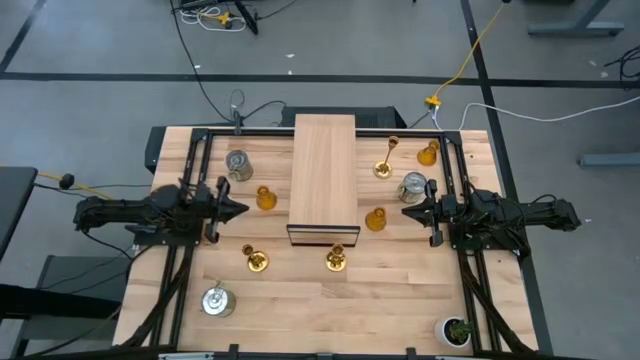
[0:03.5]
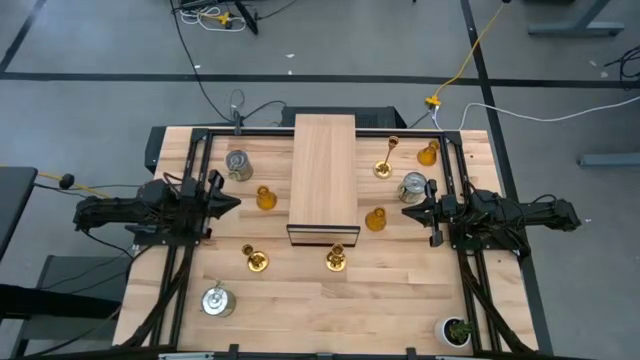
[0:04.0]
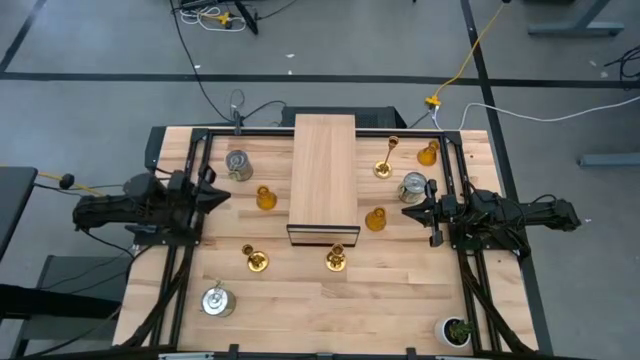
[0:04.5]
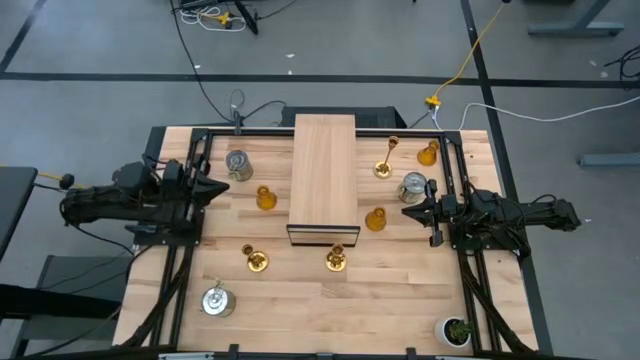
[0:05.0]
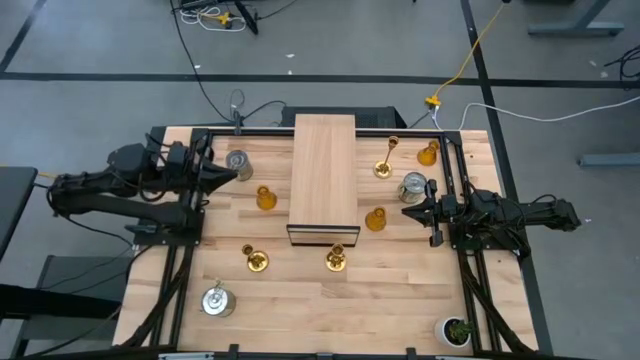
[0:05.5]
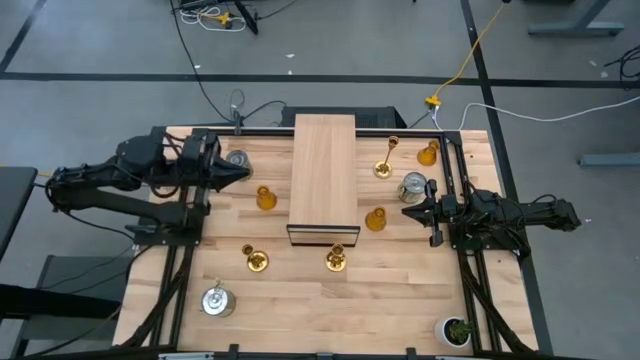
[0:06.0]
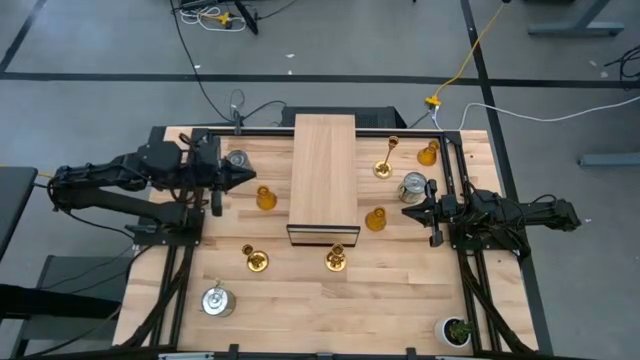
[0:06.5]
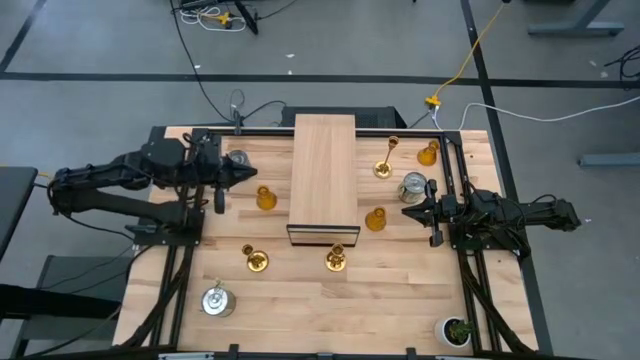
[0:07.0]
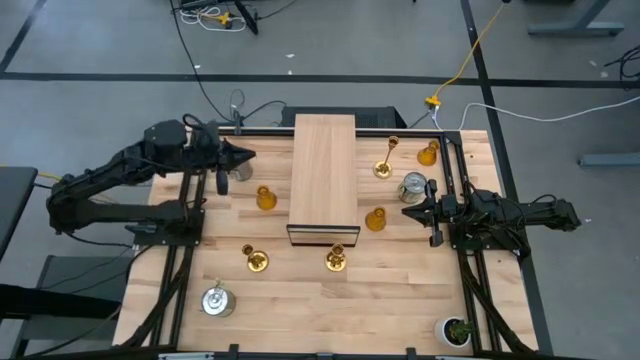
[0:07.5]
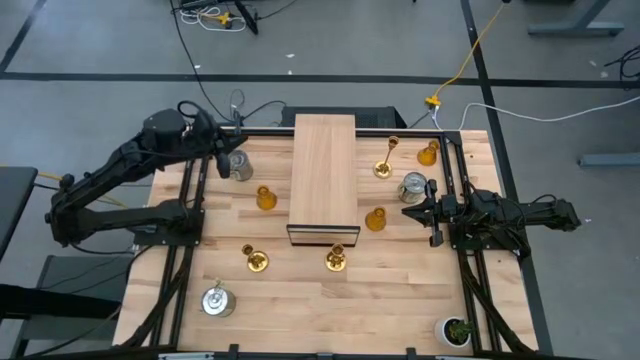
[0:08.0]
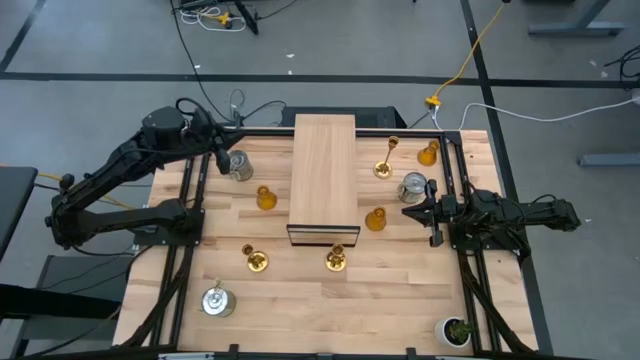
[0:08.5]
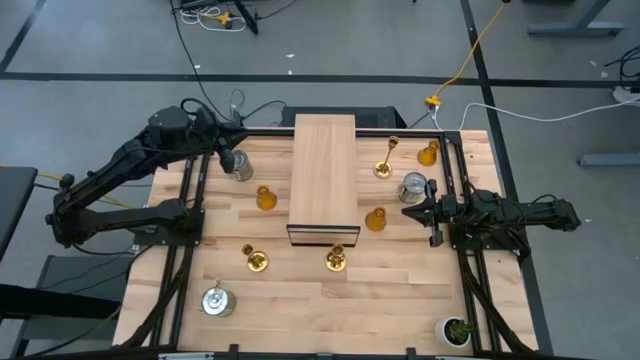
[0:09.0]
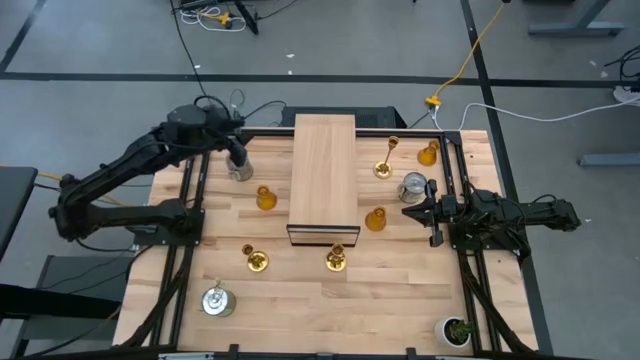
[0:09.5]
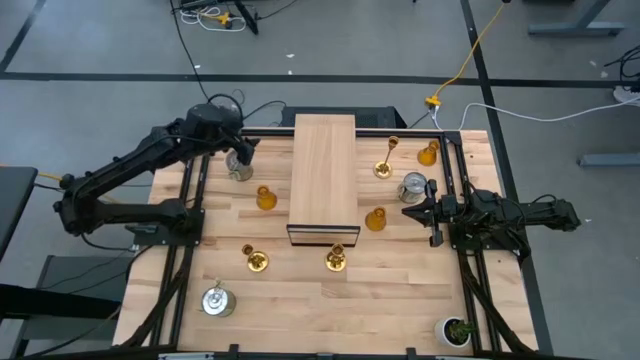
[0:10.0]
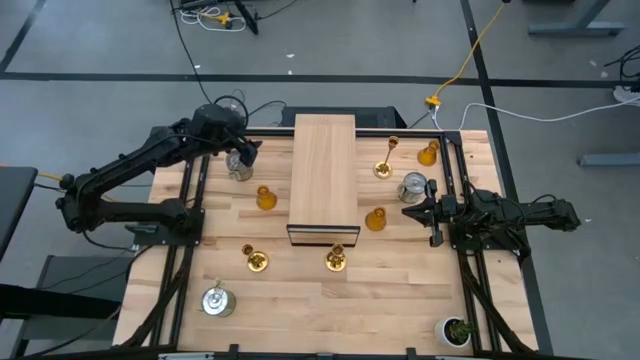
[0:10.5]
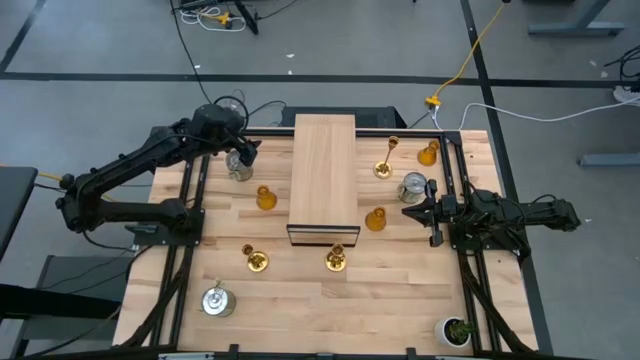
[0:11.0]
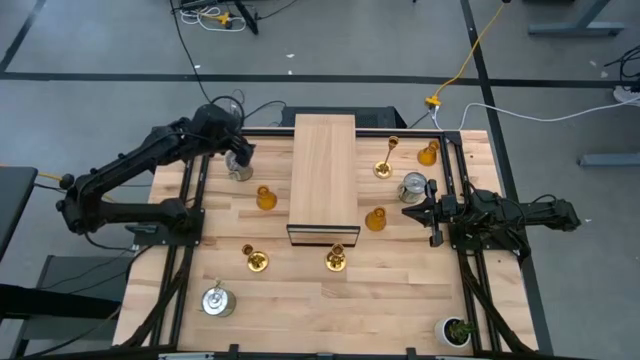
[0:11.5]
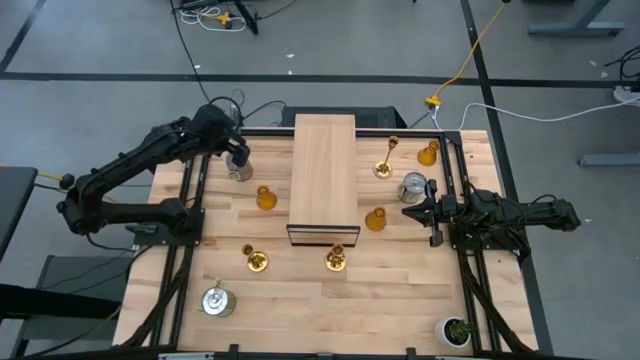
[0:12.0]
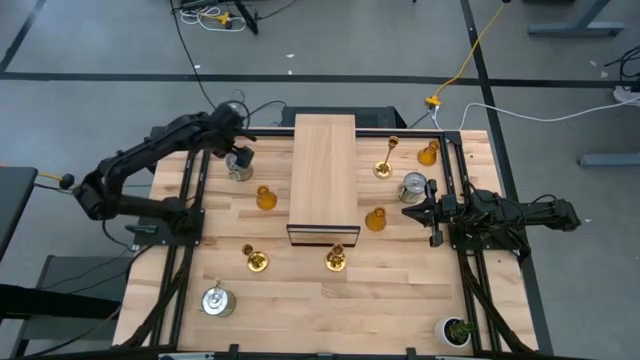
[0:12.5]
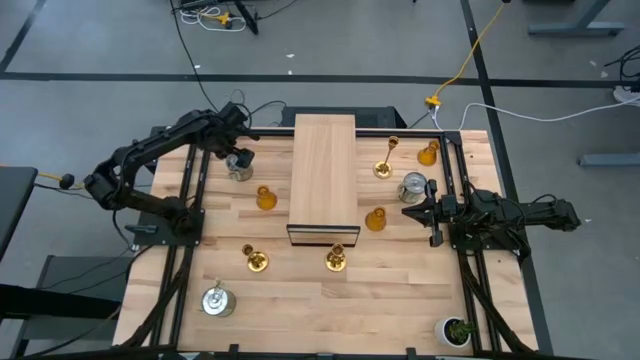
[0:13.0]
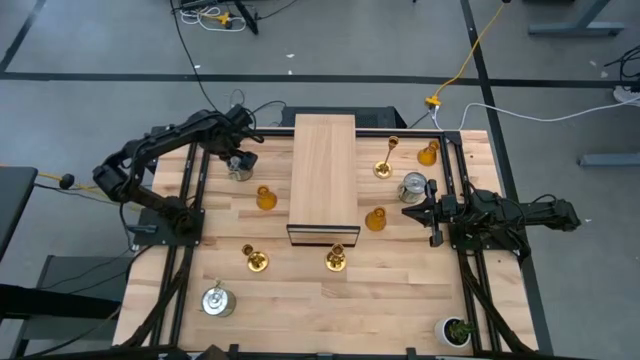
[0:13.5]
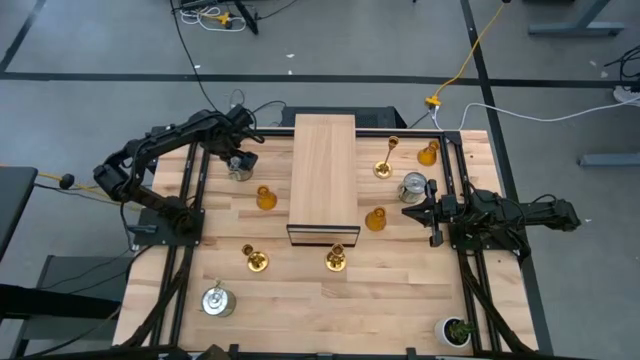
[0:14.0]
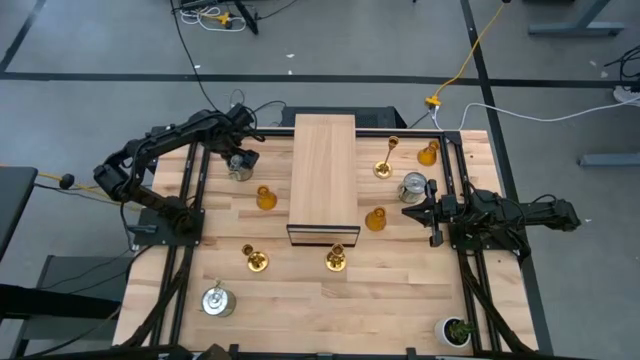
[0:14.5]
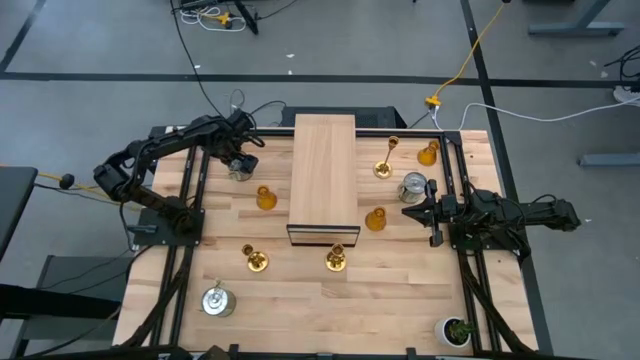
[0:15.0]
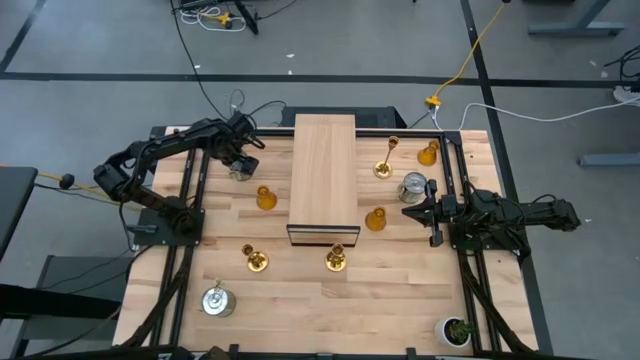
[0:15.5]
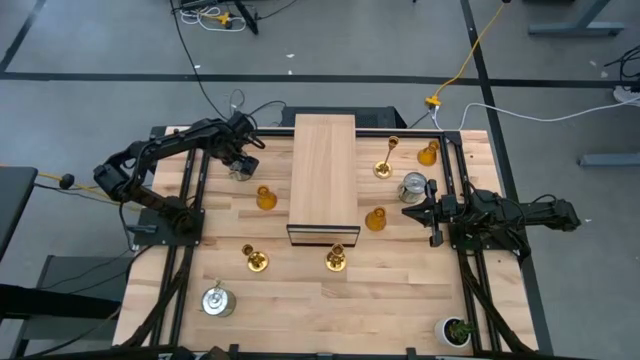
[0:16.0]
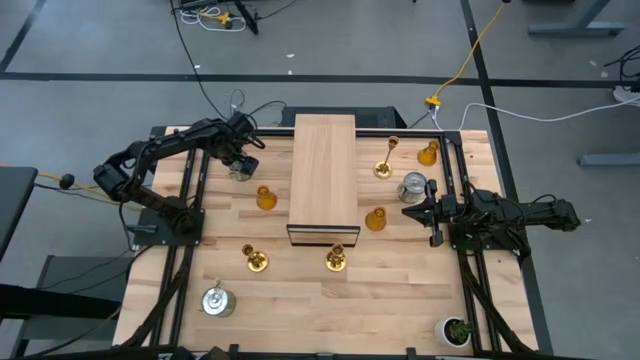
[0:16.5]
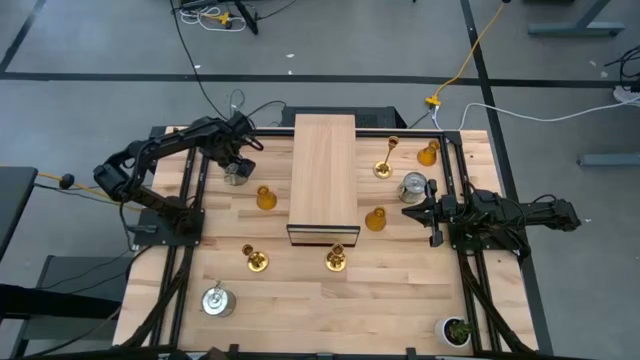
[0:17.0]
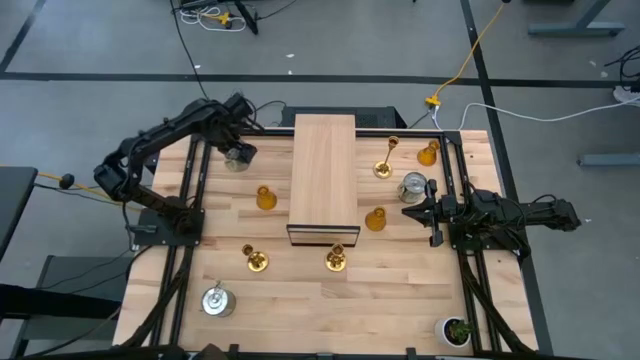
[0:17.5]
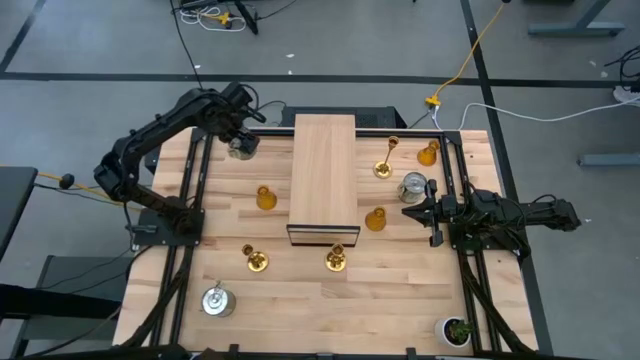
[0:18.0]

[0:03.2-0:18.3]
Task: Pick & Place candle stick holders
Put the top left scented candle can on the shelf
